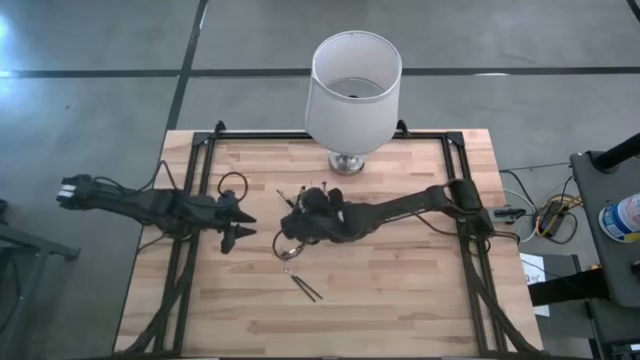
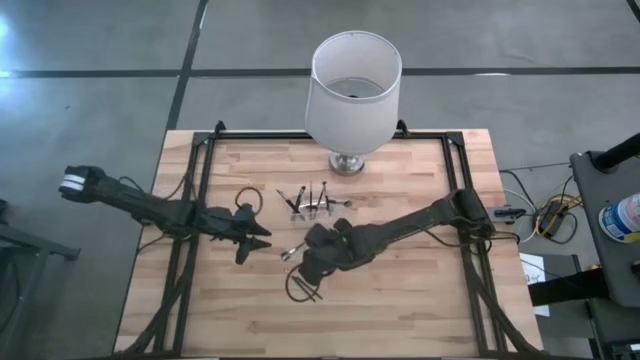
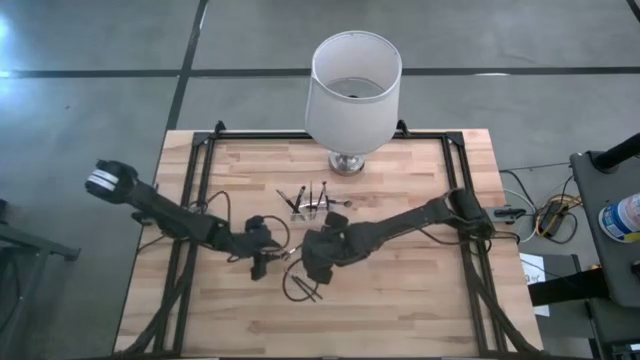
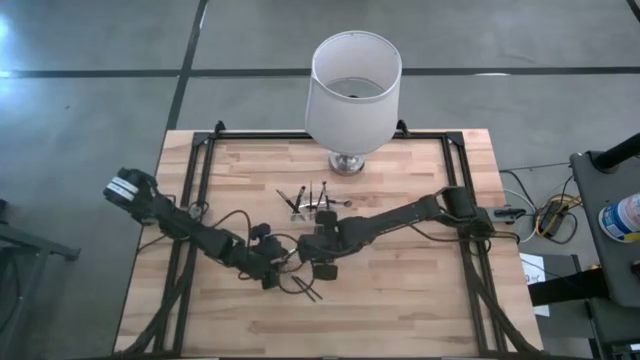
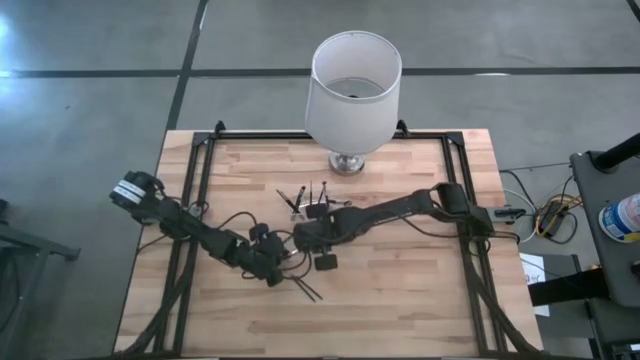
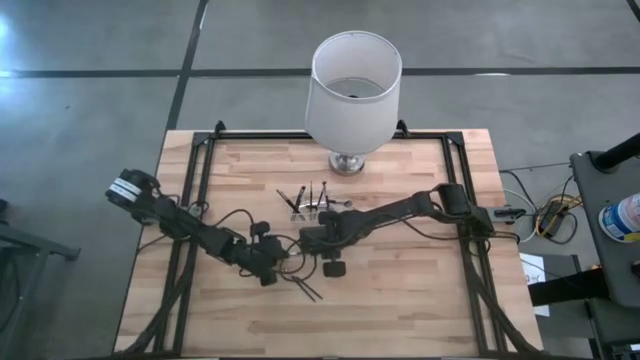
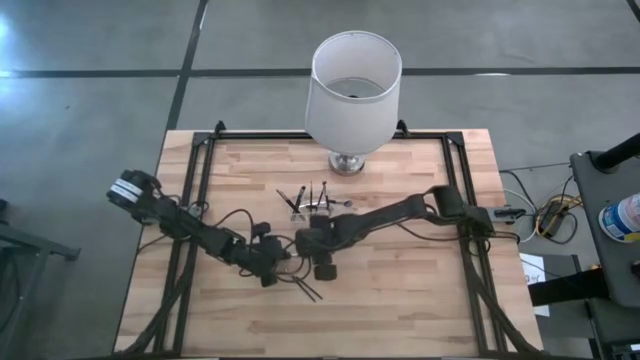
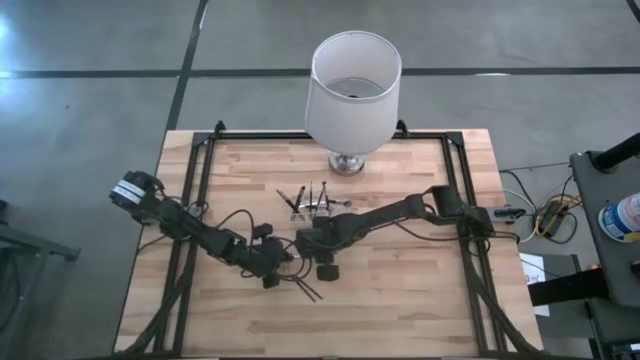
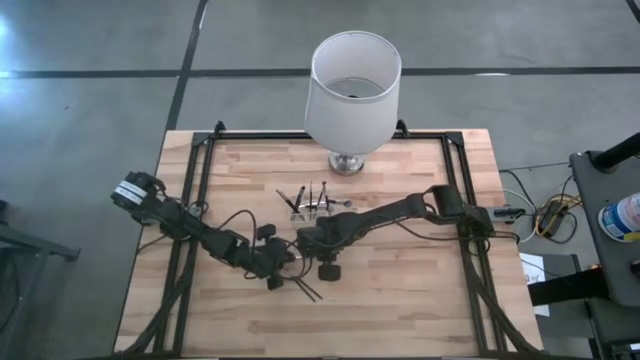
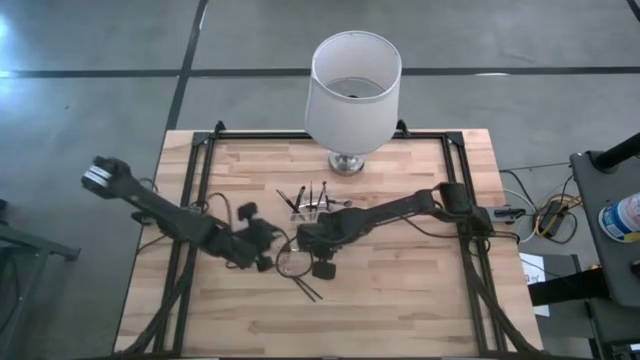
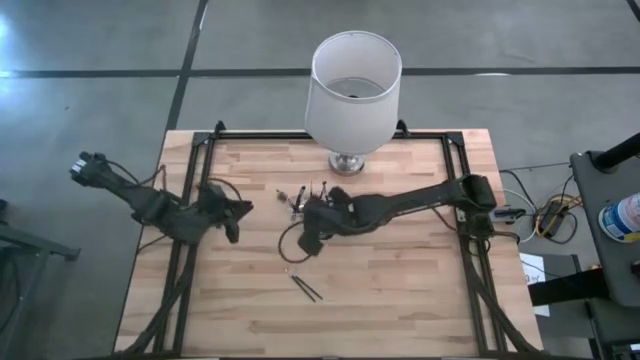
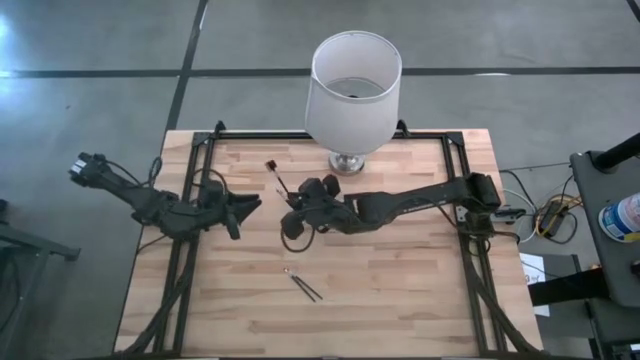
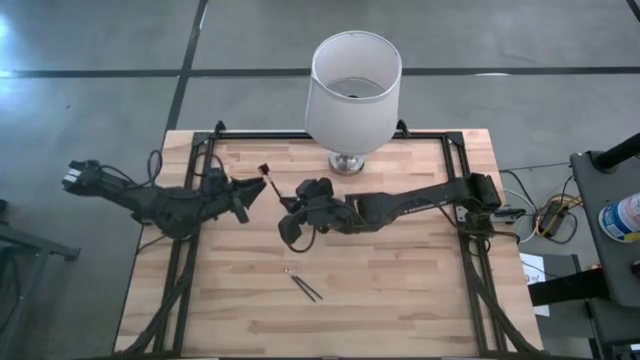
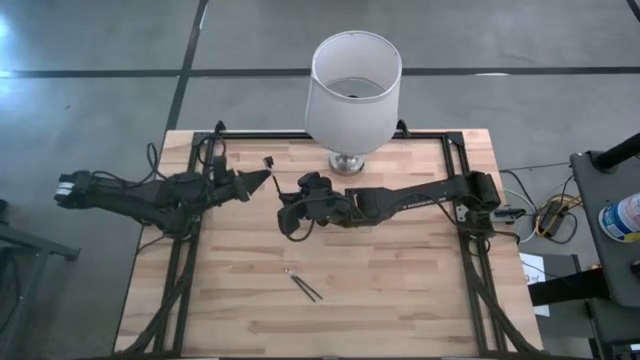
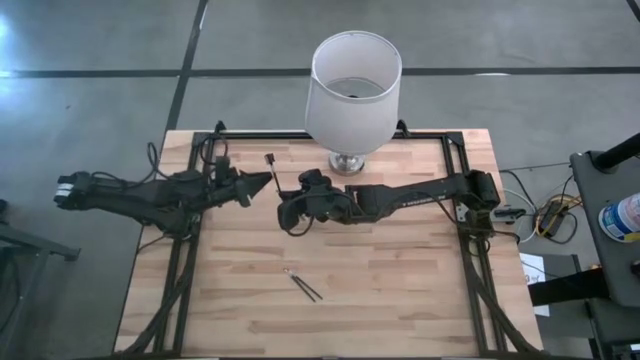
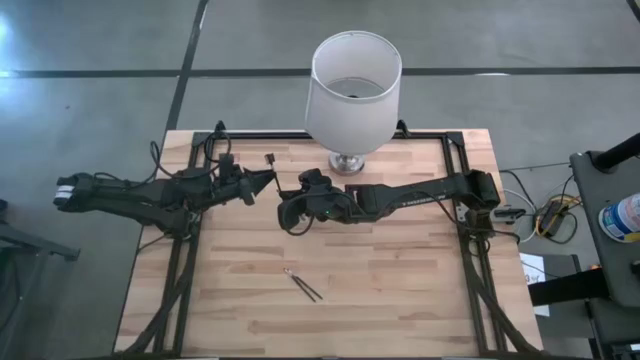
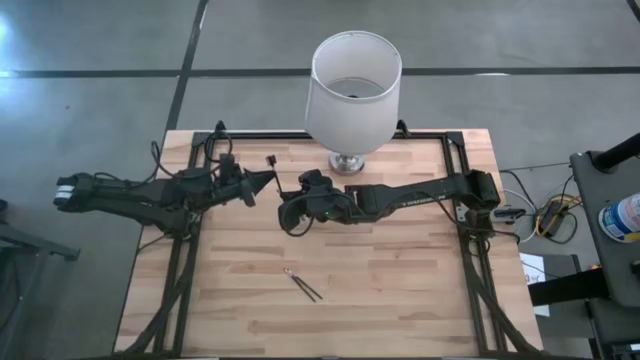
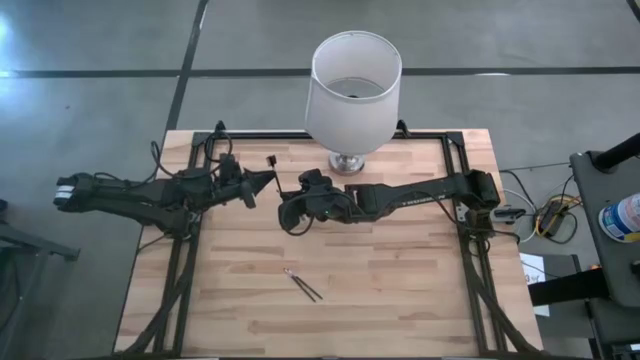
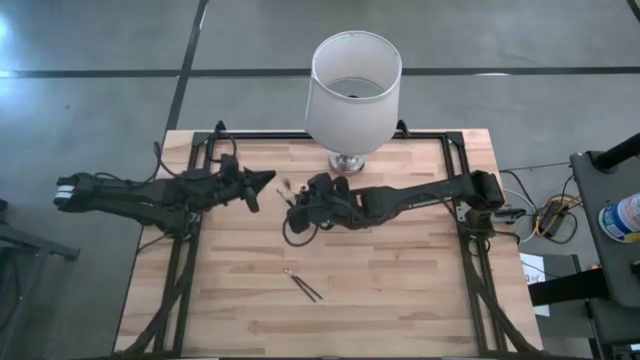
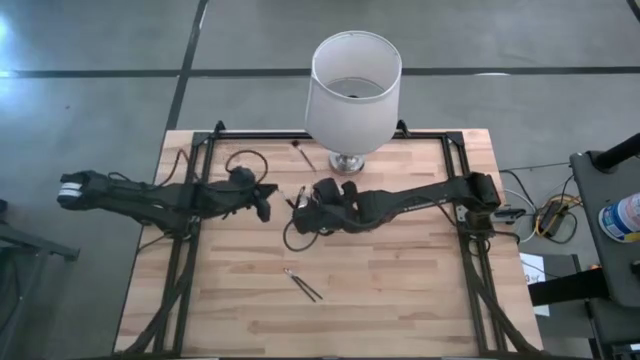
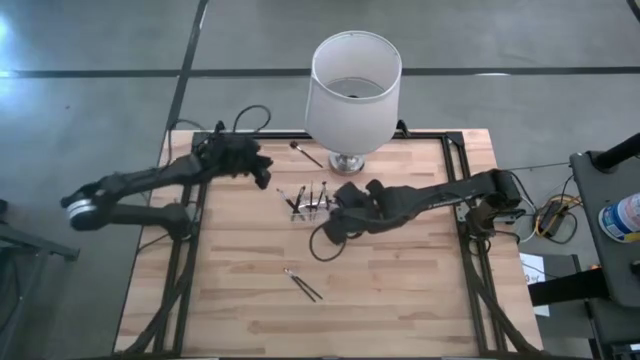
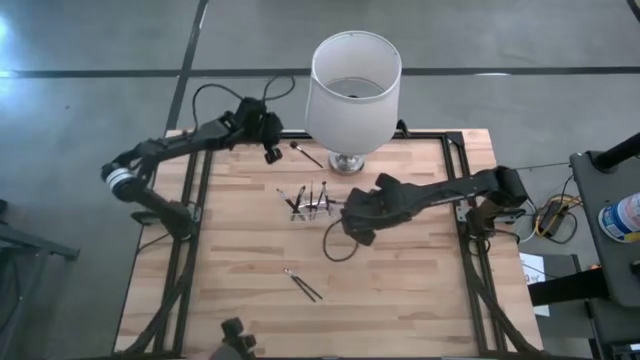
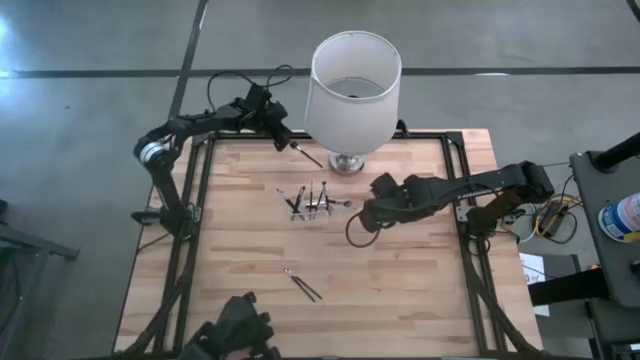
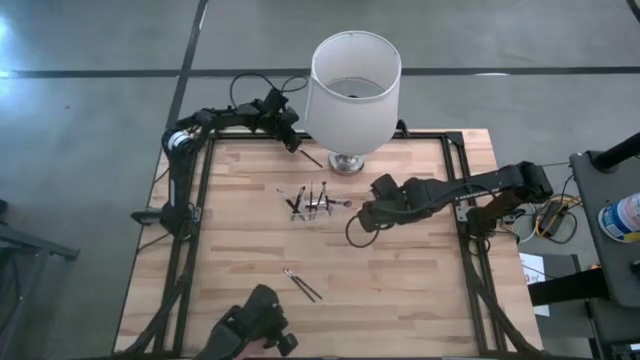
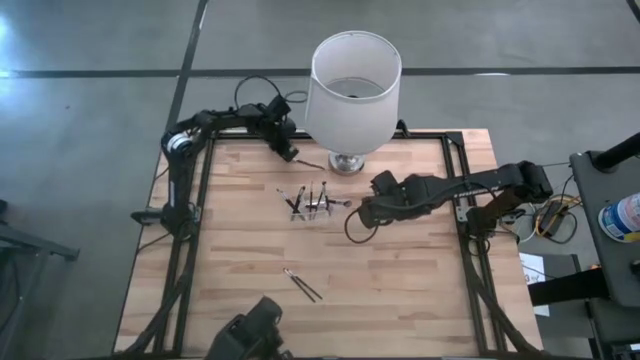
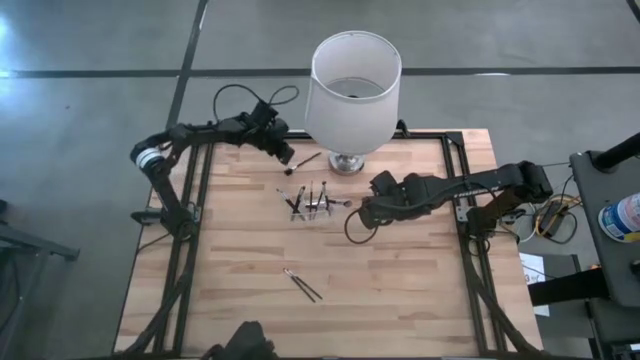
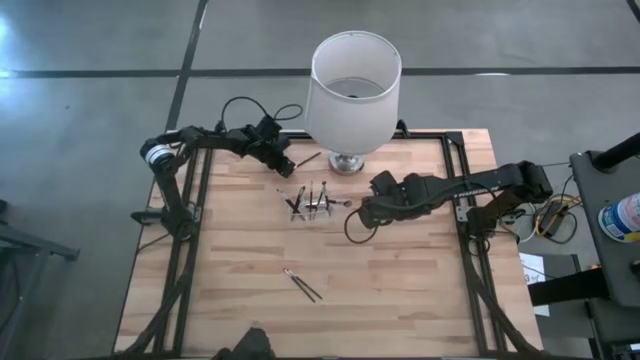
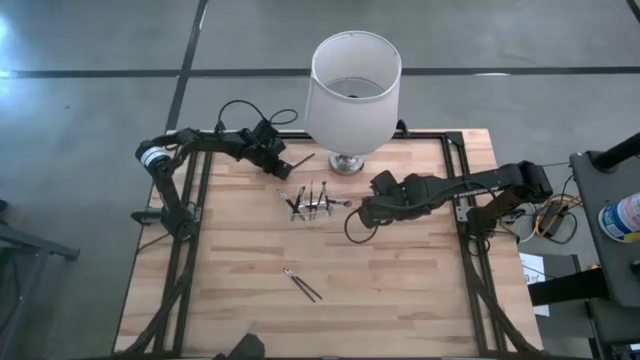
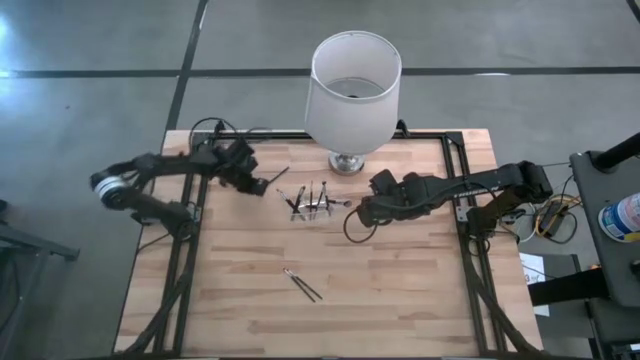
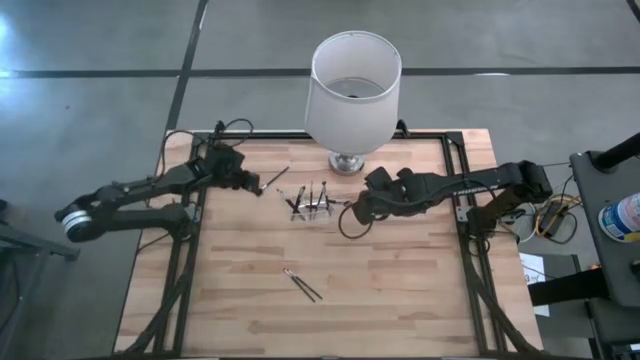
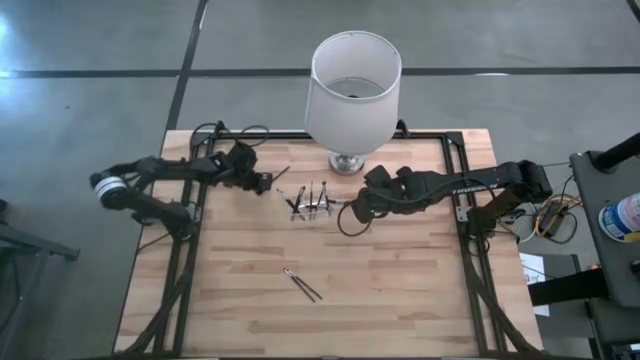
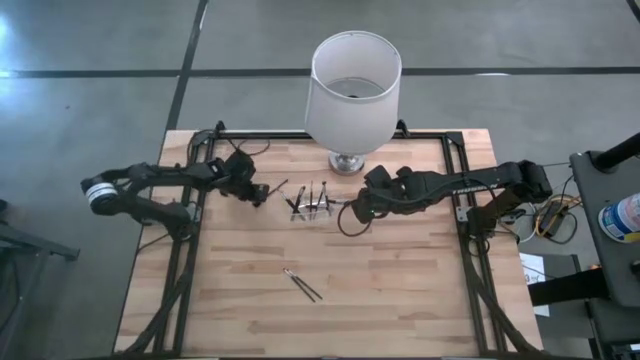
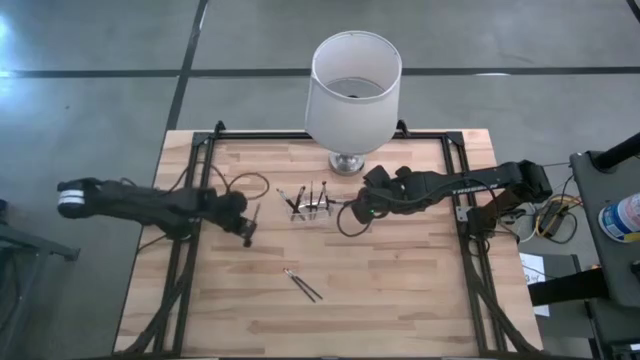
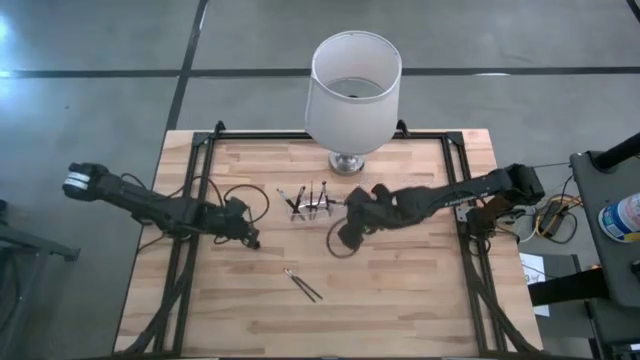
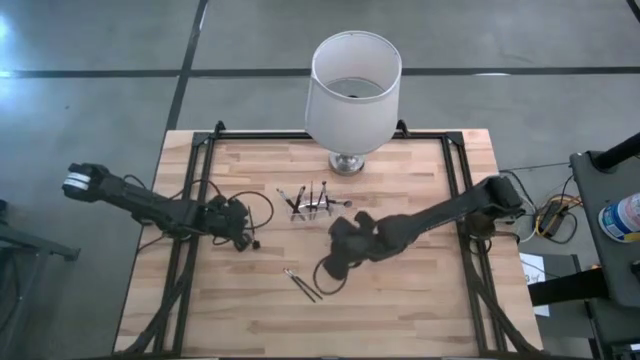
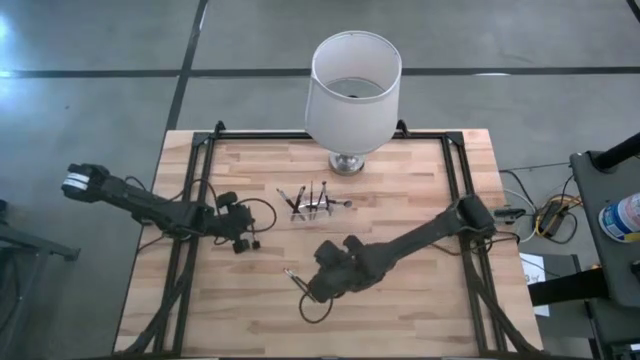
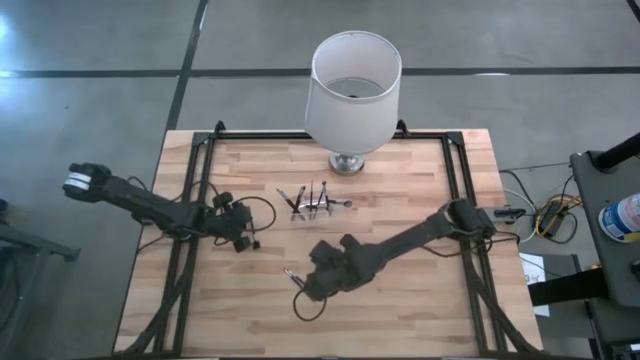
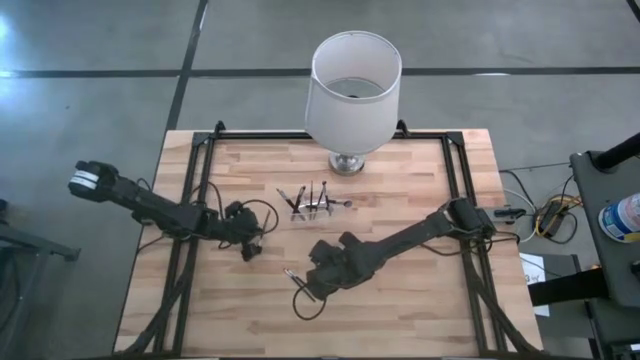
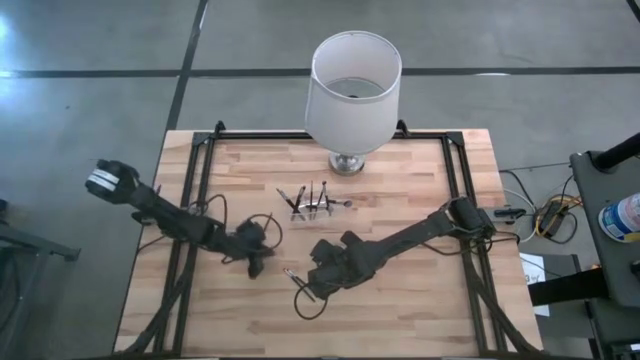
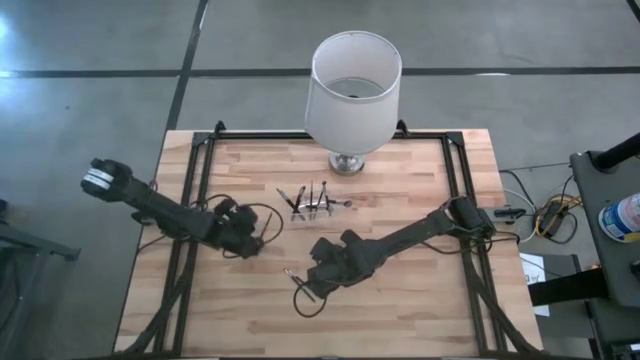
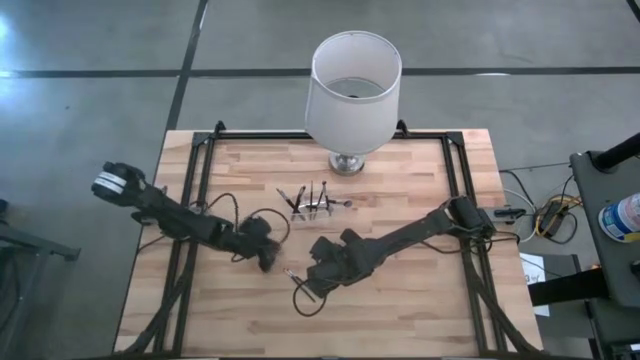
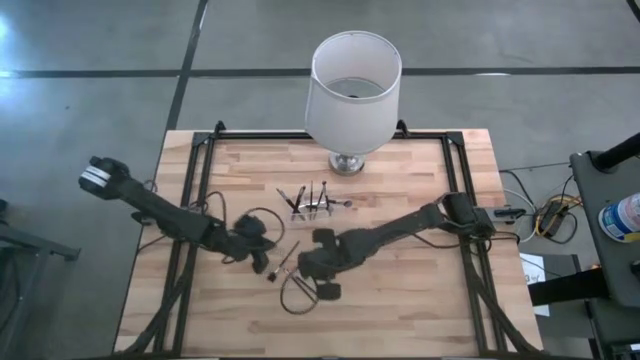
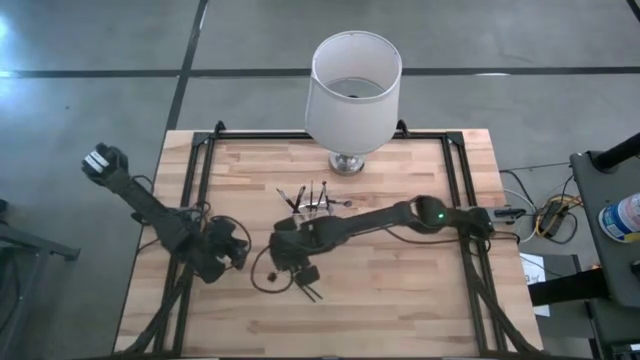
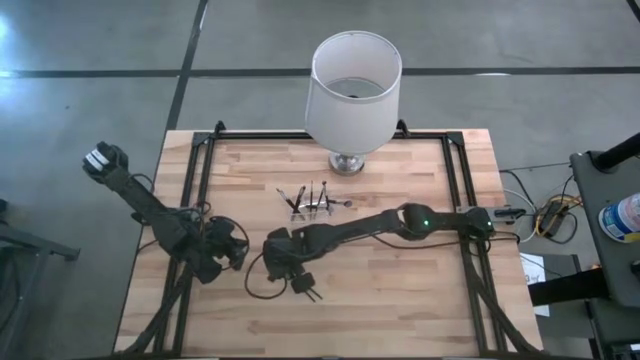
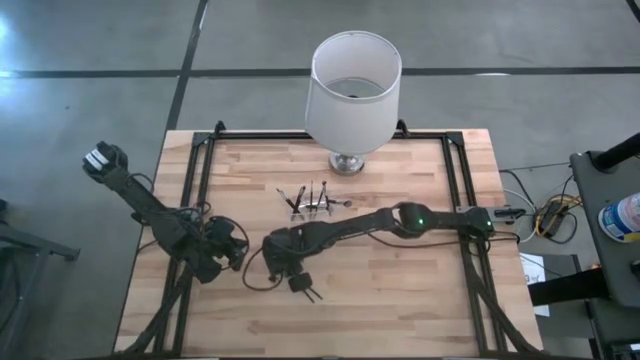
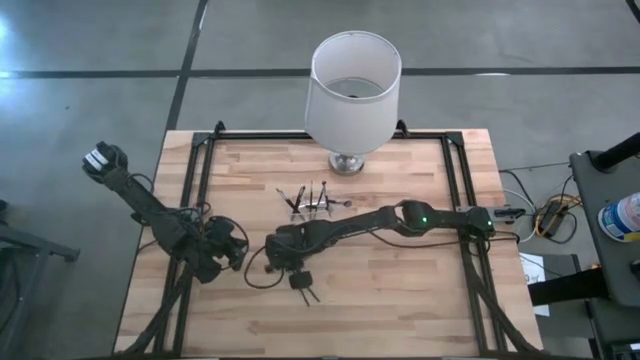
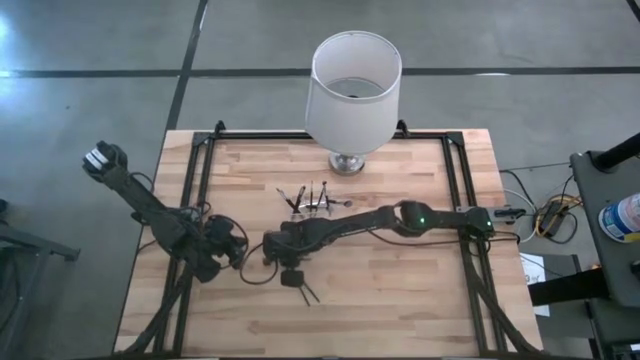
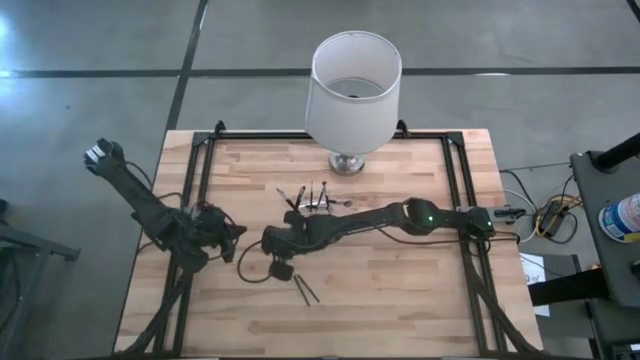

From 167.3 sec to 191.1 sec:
Task: Put items in baskets/containers
Put the brow brush into the transparent organizer
